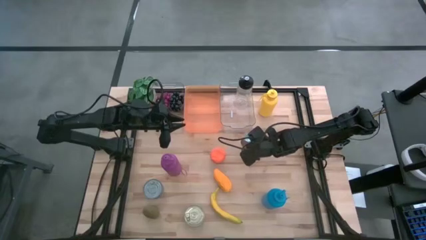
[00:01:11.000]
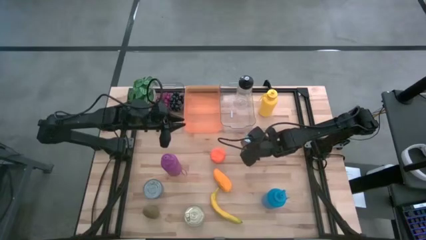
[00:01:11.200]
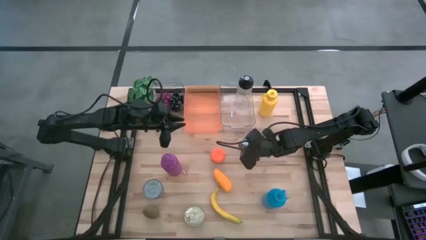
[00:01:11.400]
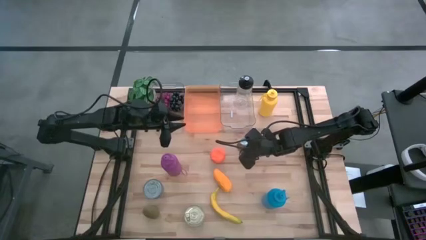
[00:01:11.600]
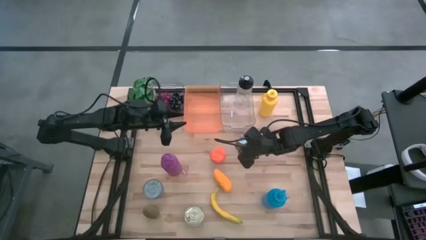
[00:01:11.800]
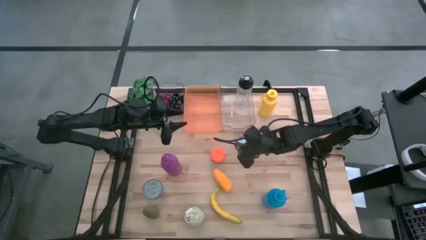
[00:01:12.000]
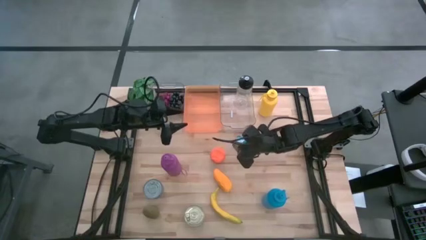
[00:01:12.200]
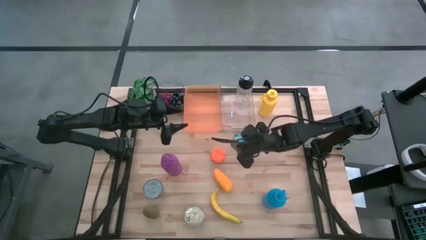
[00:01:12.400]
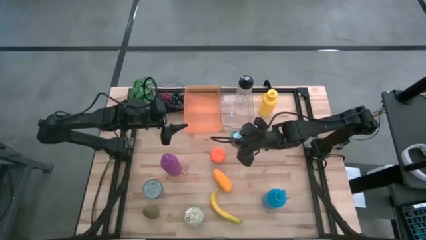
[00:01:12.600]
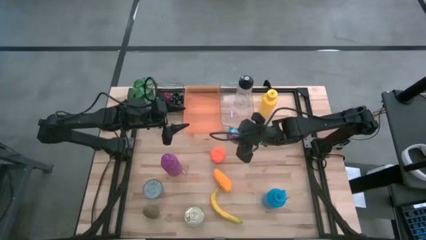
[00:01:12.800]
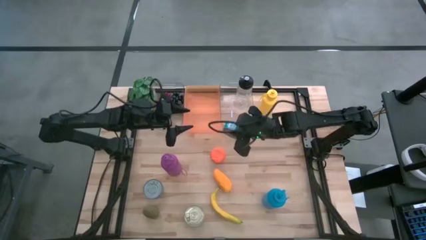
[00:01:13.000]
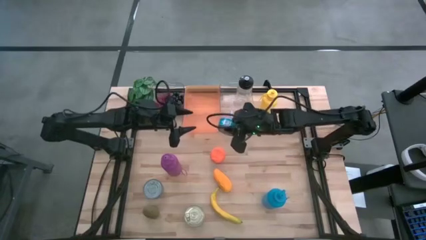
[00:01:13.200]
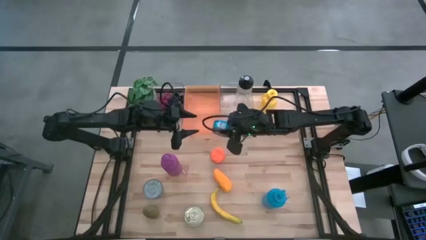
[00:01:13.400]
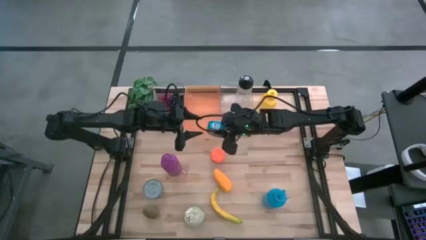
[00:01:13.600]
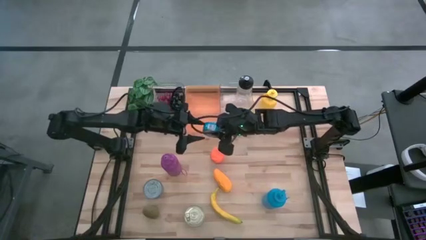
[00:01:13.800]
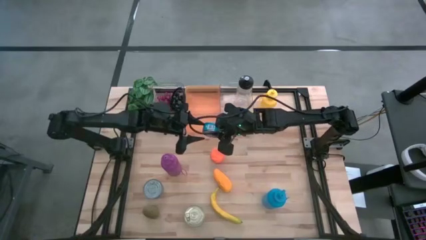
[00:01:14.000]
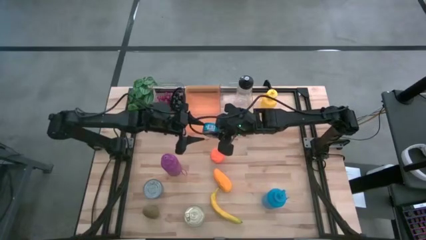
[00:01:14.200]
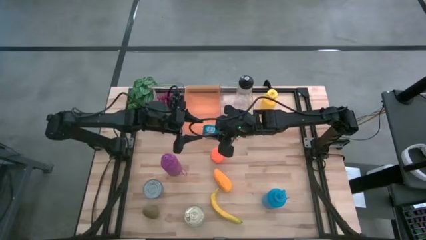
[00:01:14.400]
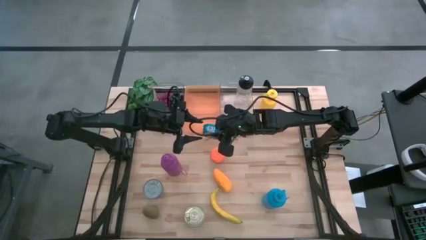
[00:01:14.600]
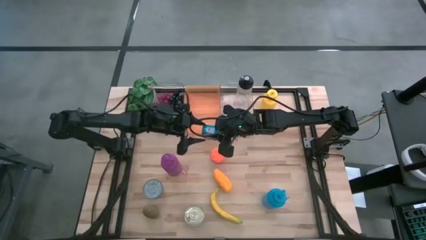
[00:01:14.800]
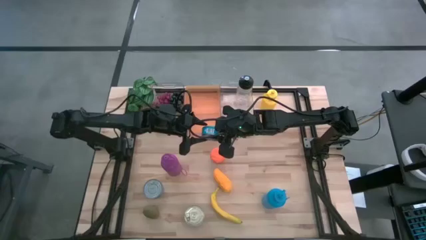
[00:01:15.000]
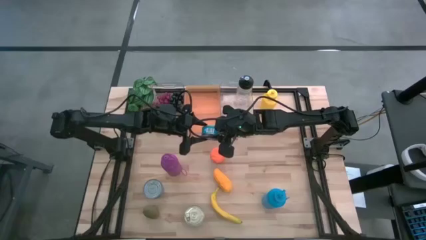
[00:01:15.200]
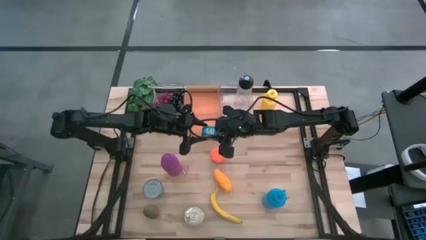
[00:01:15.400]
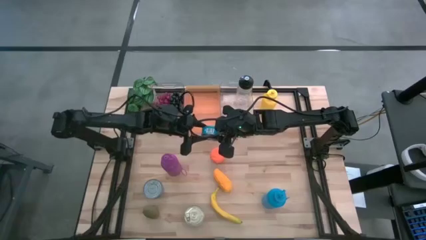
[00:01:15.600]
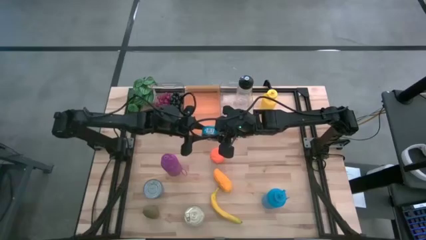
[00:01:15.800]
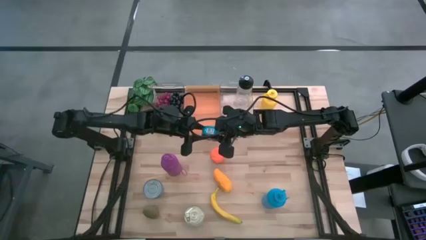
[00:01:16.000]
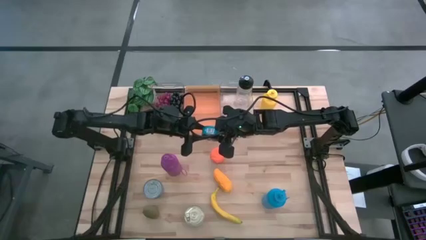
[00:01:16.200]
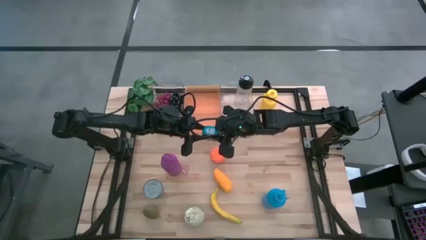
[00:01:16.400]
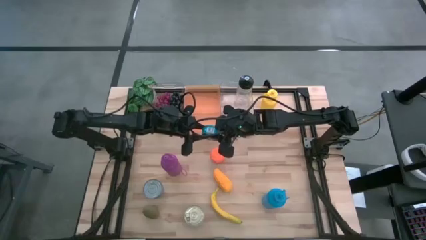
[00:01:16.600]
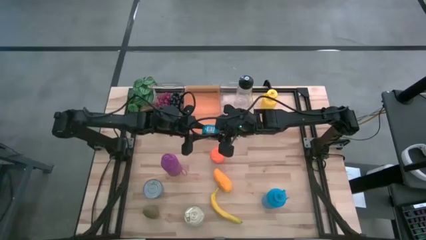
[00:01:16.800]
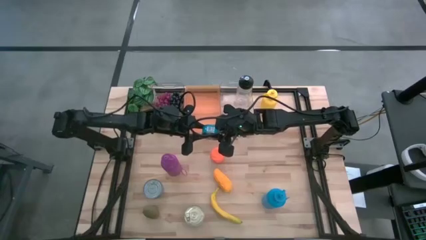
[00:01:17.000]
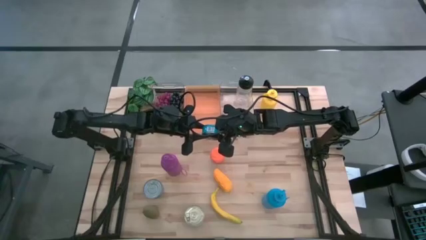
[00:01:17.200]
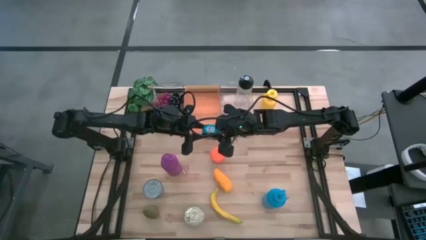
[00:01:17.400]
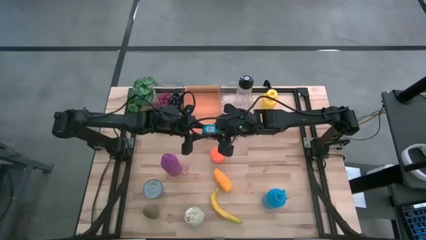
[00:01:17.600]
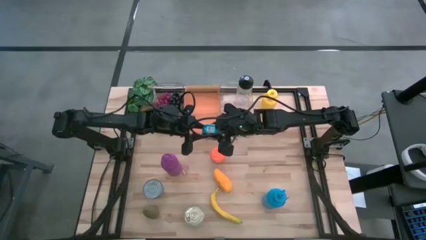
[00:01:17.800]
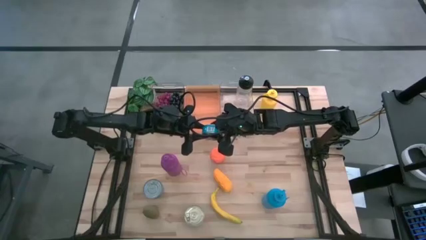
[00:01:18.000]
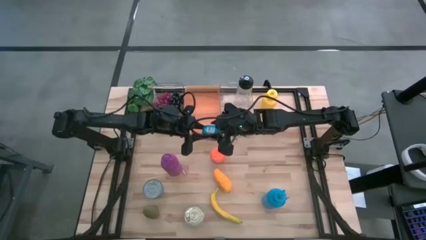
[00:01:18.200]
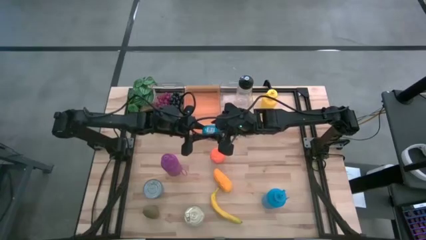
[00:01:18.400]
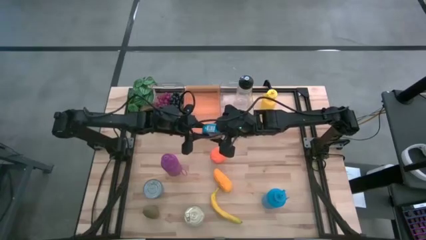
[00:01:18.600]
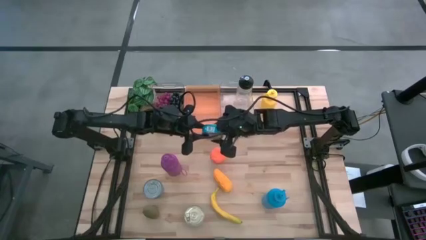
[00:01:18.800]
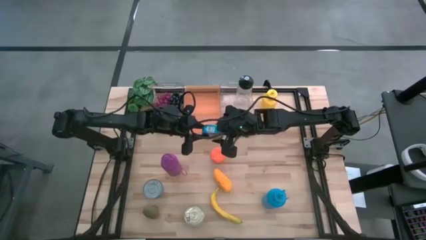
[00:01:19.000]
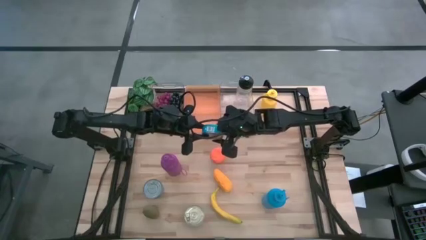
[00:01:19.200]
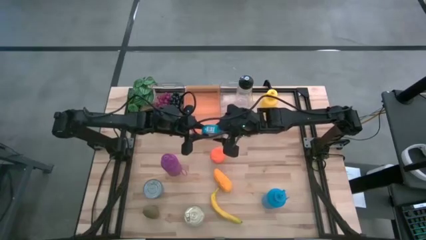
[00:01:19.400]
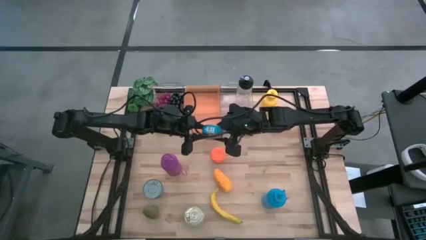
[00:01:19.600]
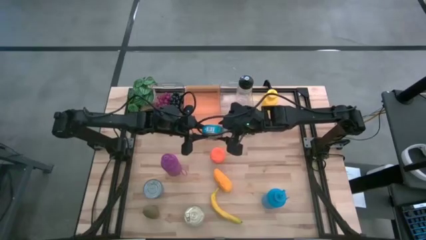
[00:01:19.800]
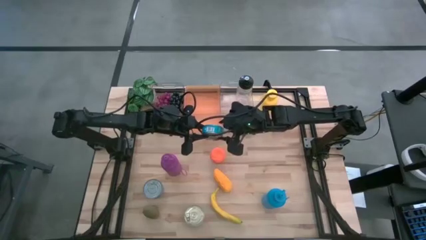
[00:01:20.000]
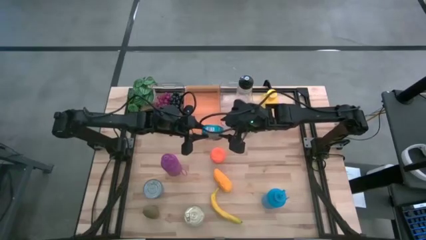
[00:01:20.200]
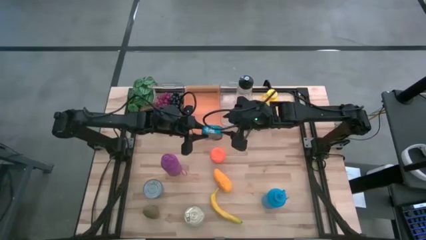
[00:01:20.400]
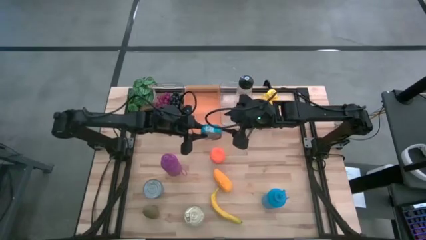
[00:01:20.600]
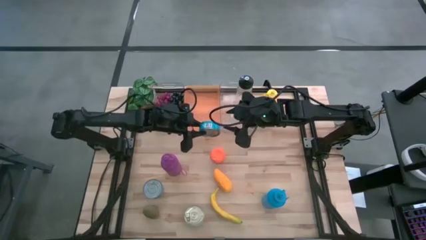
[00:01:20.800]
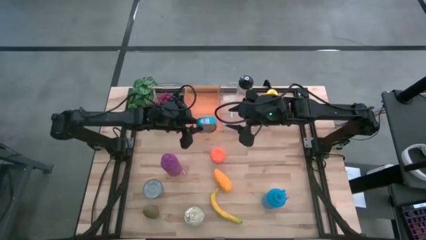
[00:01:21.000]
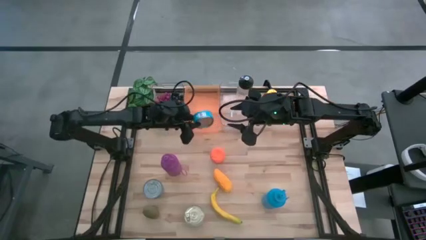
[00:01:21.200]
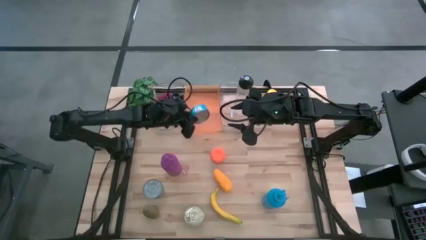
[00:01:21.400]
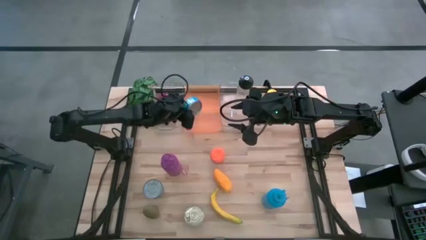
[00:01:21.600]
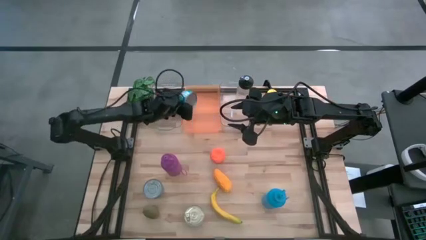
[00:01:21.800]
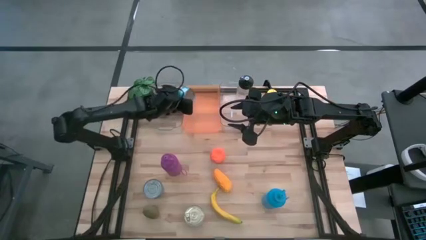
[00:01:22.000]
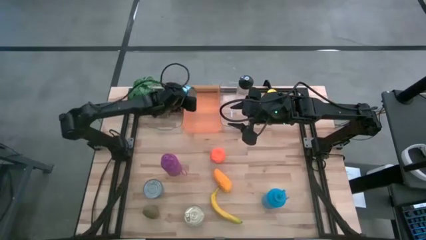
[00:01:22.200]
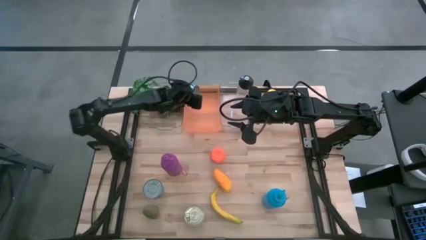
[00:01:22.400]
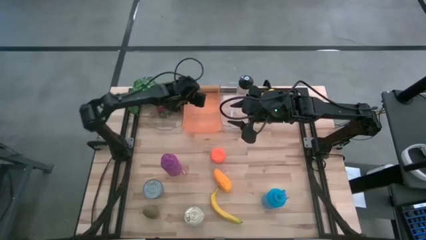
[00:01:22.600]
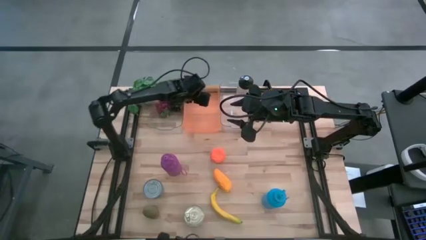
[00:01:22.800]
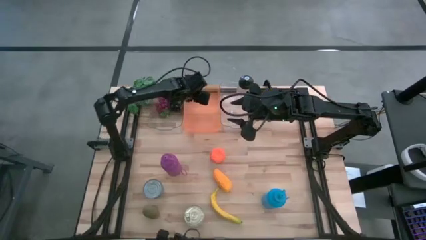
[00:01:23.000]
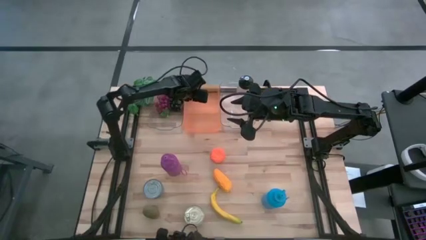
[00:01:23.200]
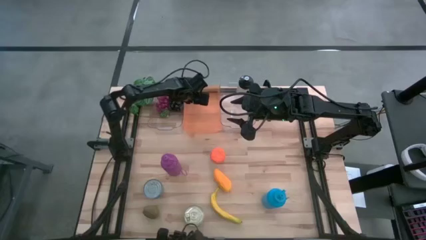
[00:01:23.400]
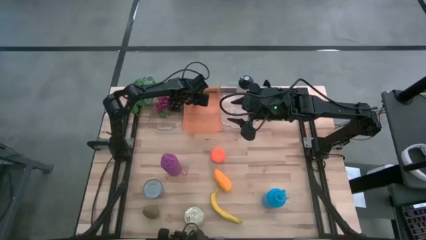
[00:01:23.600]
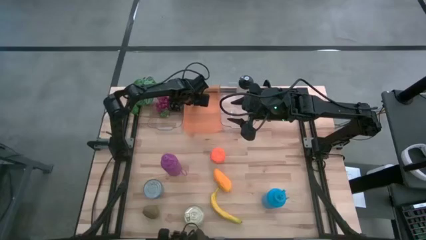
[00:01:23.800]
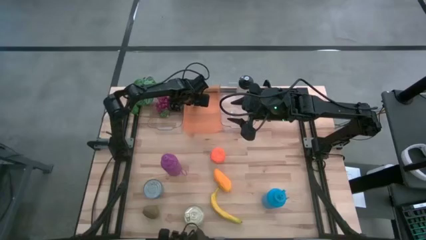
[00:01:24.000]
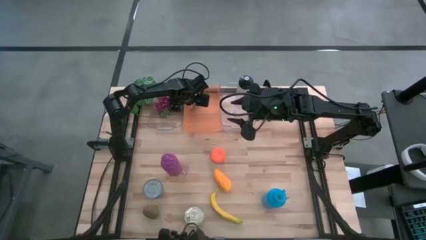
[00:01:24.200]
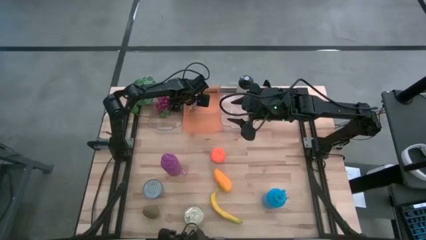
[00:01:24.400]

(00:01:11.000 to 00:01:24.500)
Task: Pick & Place Food Item
Put the yellow and blue tuna can into the orange bin

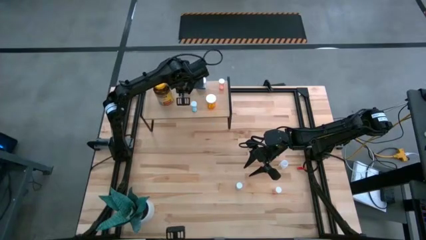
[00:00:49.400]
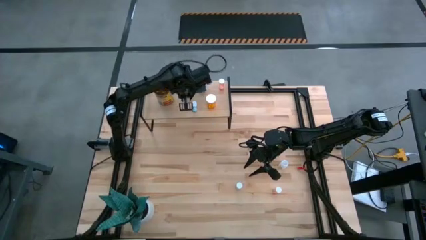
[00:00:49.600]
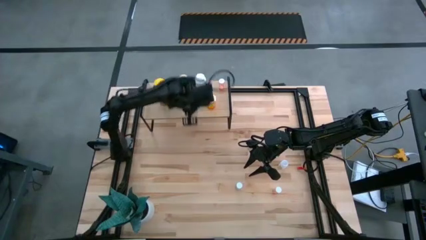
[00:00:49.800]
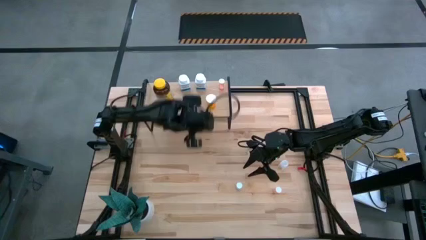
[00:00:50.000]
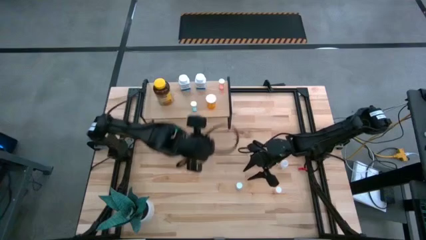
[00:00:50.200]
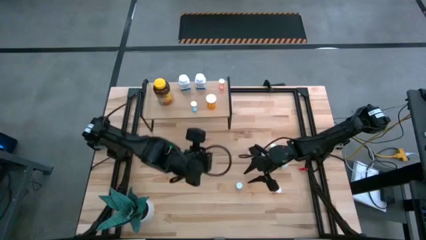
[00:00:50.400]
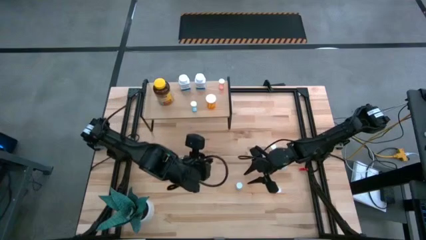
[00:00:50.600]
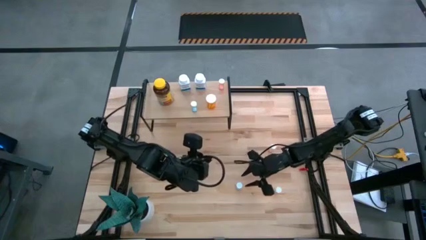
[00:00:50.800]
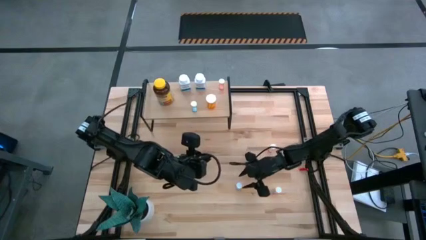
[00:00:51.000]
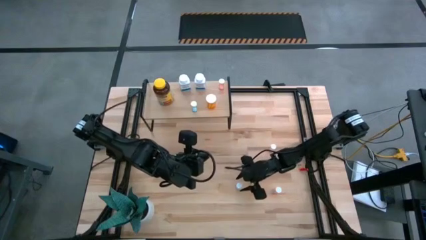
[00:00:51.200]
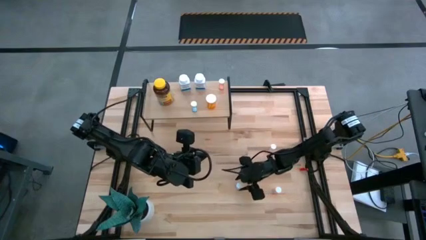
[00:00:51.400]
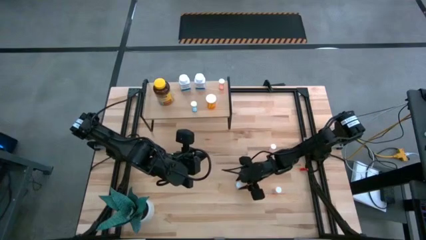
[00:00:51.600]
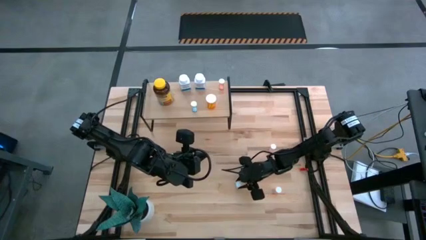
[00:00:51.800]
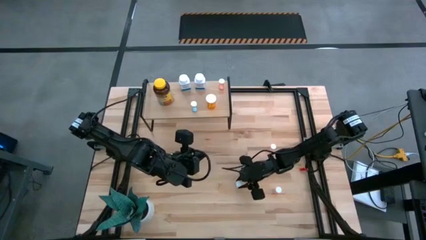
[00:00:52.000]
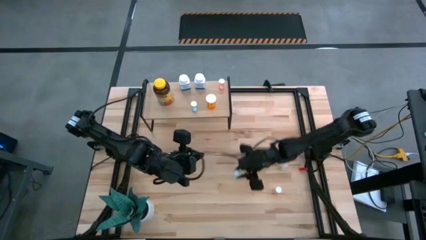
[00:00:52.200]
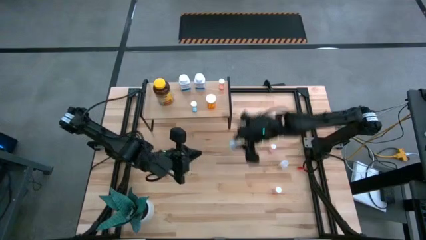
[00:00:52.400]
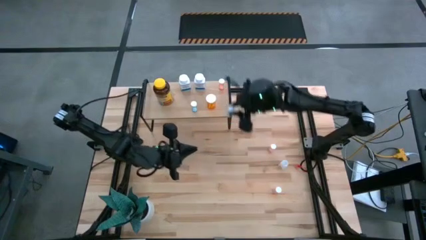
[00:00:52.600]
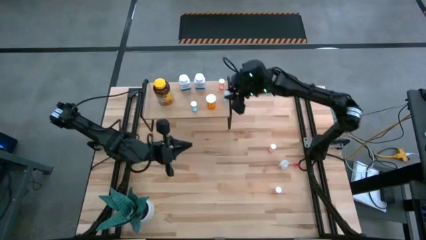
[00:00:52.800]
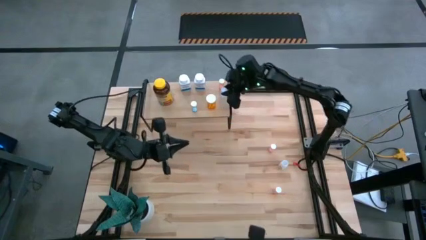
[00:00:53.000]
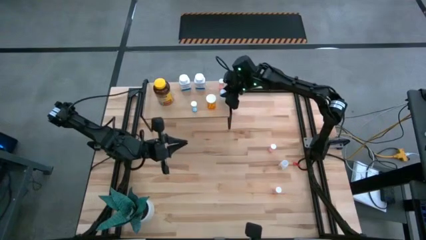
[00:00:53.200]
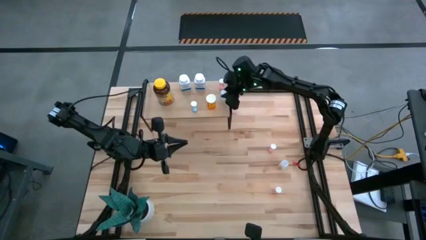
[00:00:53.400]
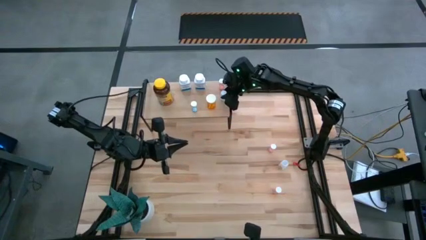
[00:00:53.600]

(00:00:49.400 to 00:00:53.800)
Task: Pick and place medicine bottles onto shelf by color
Put the green pill bottle on the shelf
